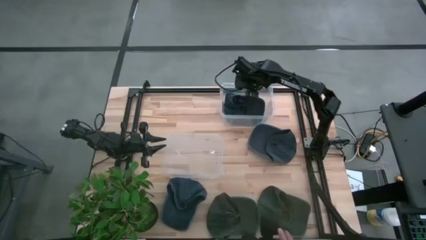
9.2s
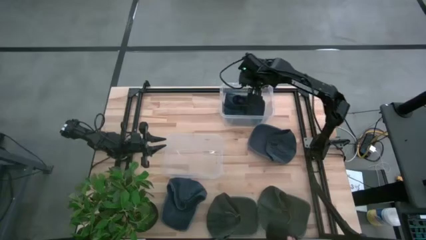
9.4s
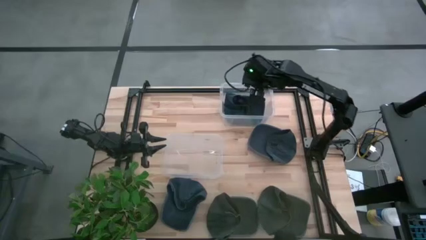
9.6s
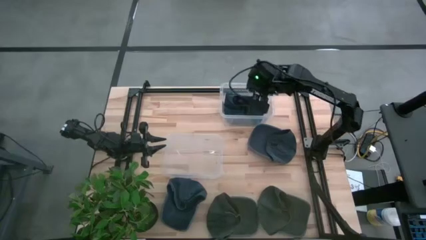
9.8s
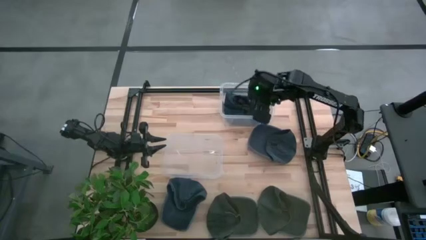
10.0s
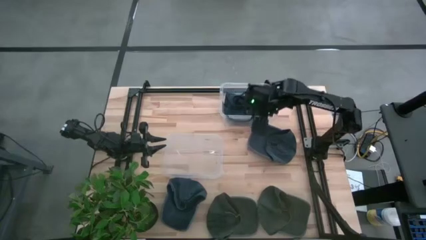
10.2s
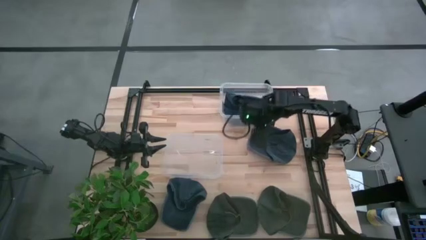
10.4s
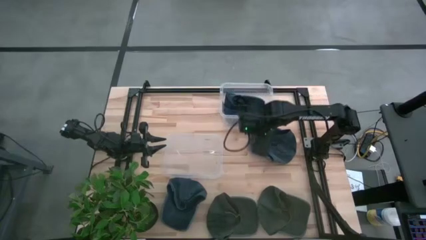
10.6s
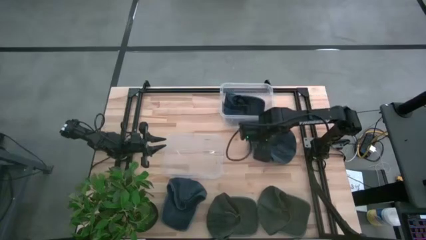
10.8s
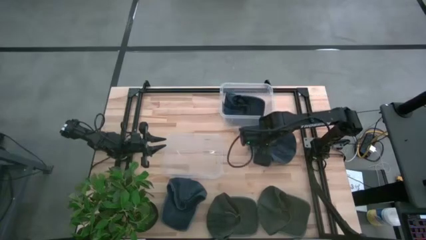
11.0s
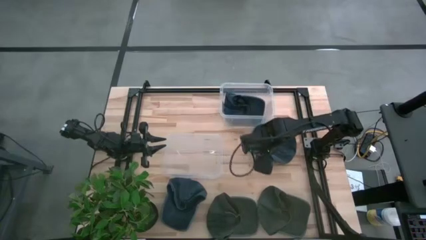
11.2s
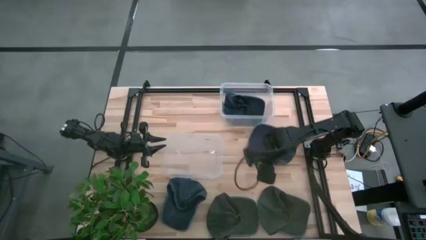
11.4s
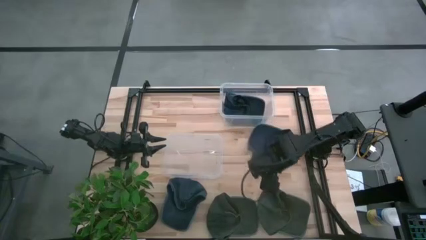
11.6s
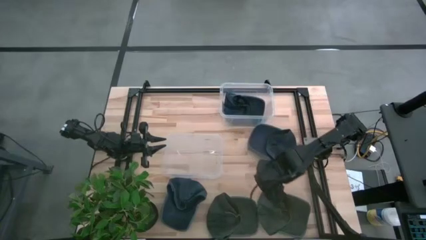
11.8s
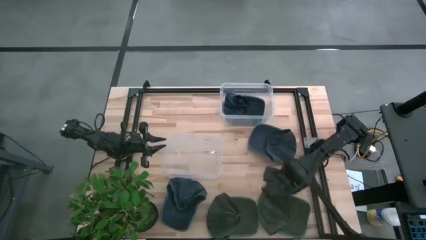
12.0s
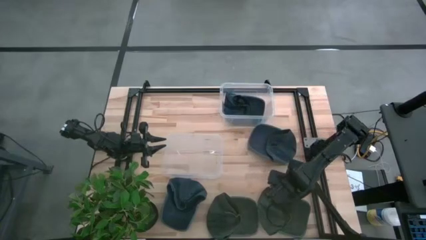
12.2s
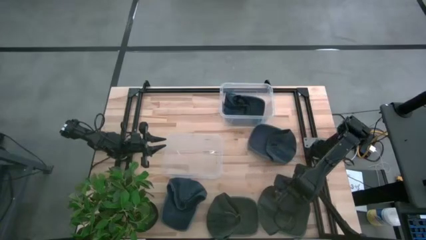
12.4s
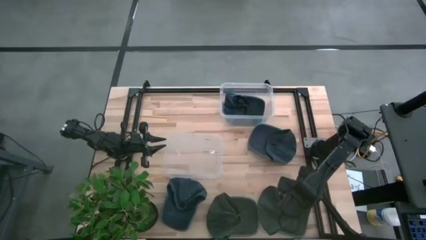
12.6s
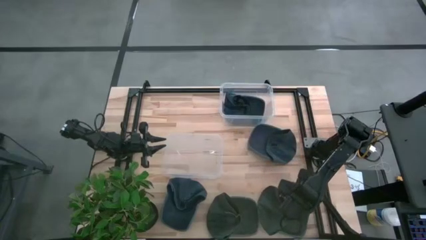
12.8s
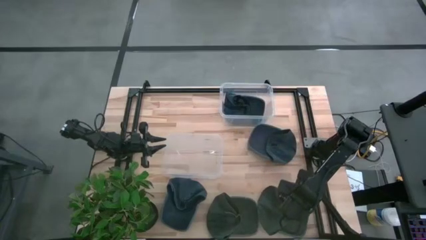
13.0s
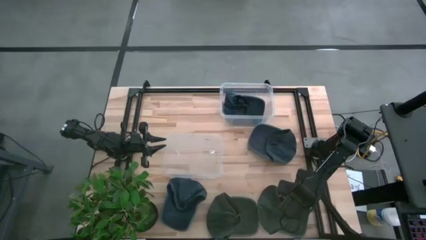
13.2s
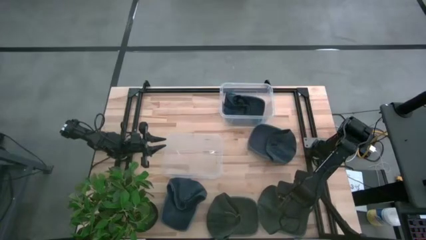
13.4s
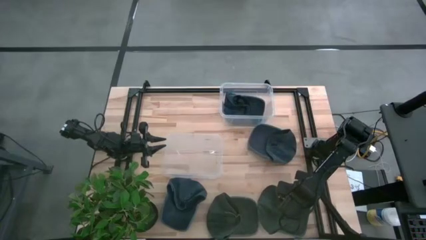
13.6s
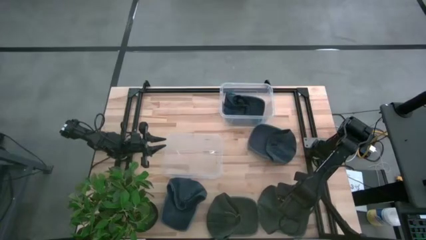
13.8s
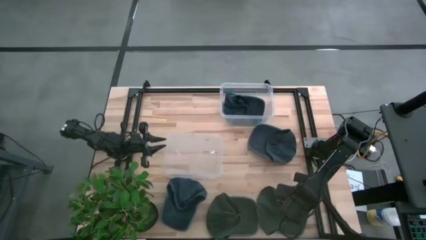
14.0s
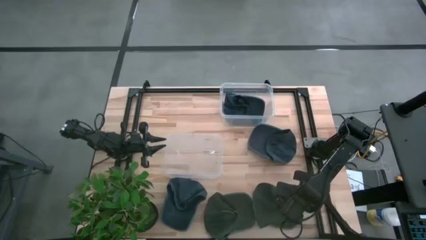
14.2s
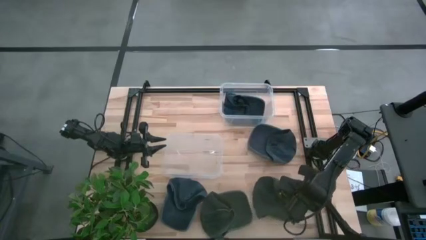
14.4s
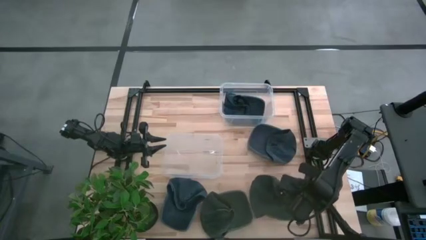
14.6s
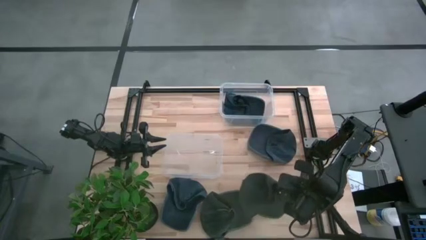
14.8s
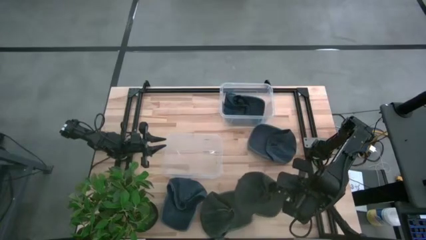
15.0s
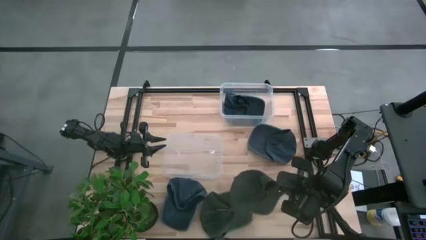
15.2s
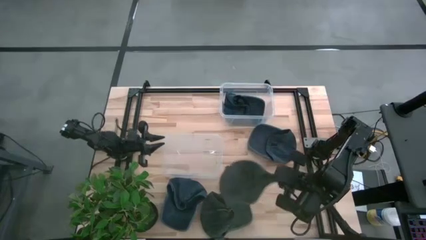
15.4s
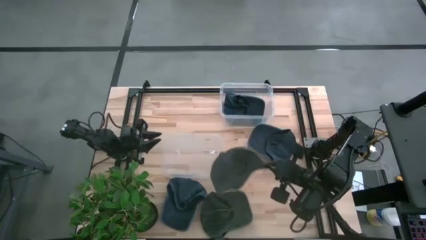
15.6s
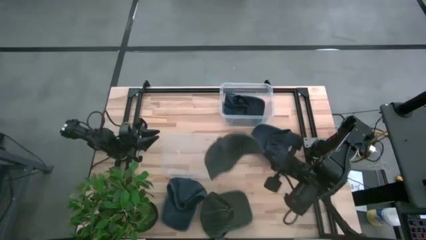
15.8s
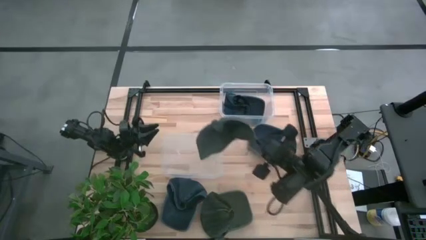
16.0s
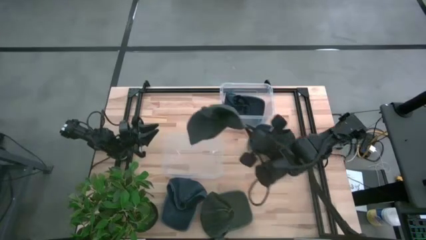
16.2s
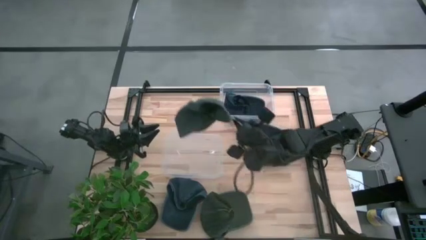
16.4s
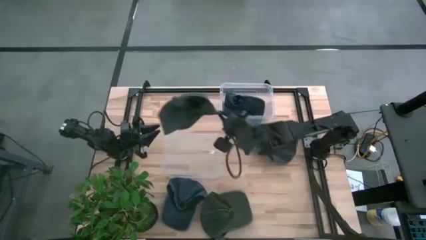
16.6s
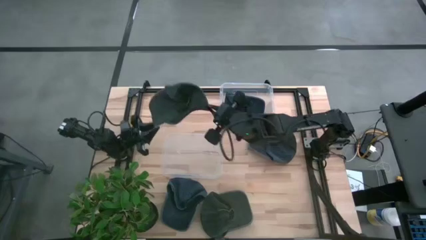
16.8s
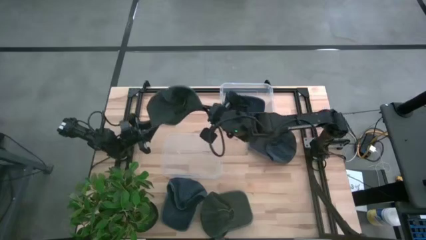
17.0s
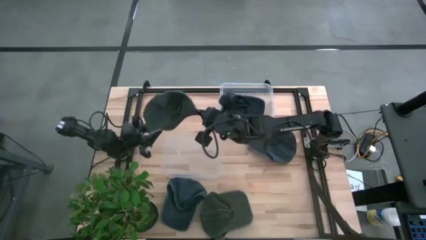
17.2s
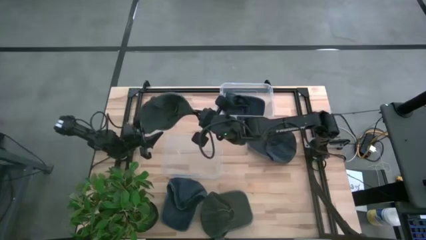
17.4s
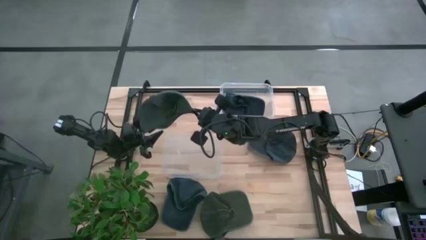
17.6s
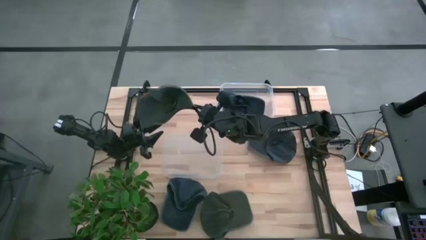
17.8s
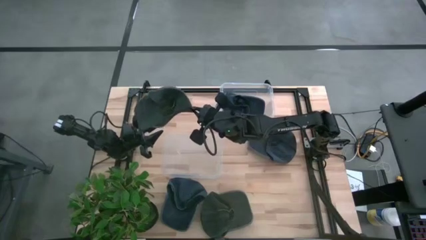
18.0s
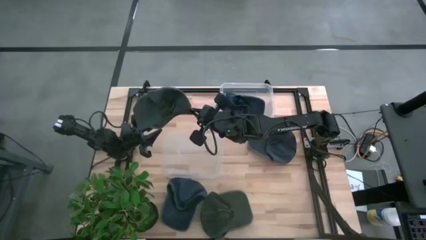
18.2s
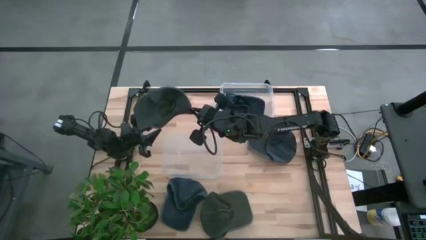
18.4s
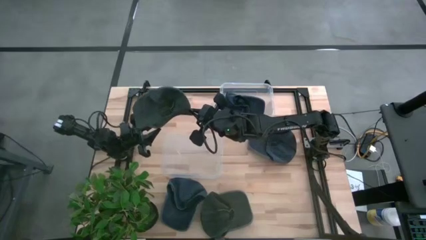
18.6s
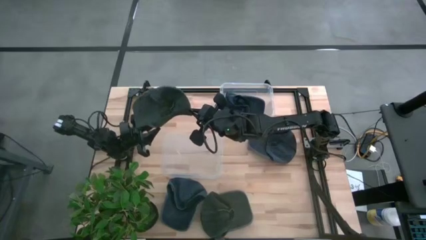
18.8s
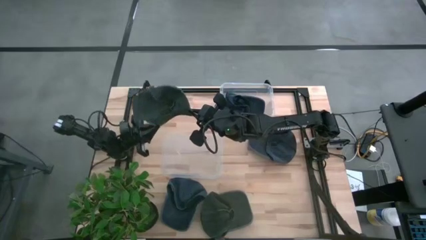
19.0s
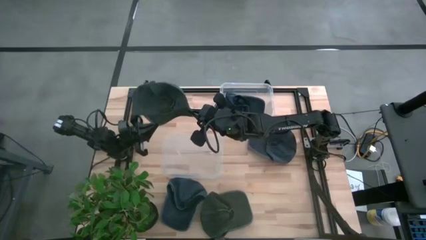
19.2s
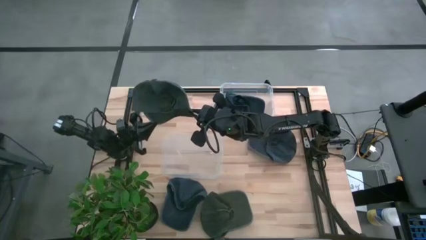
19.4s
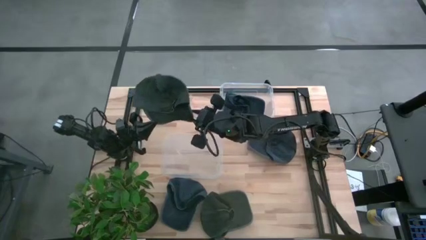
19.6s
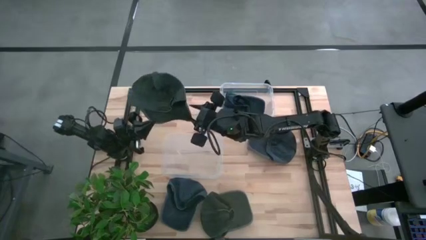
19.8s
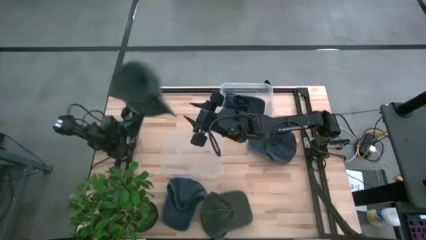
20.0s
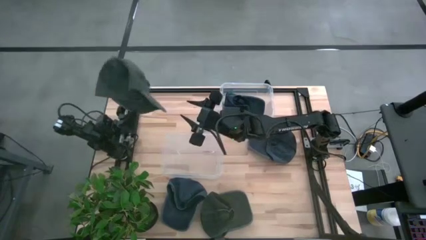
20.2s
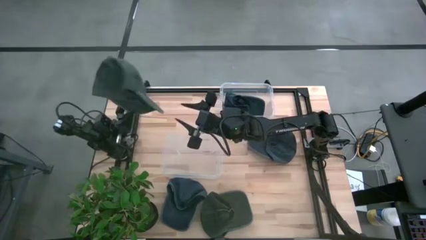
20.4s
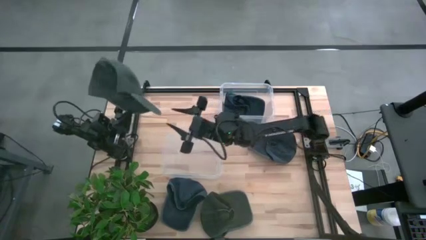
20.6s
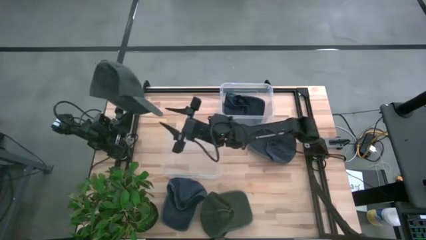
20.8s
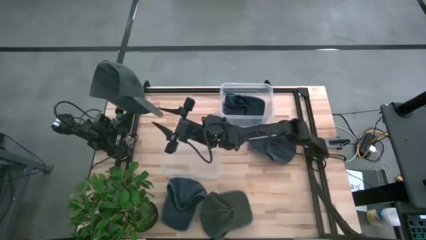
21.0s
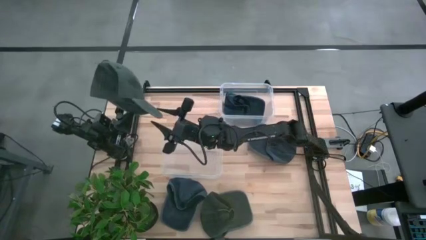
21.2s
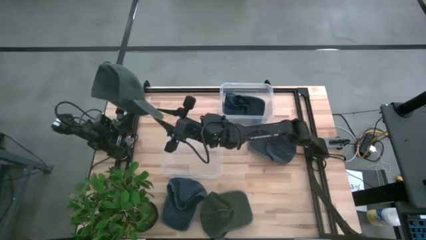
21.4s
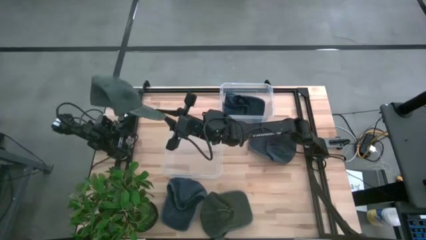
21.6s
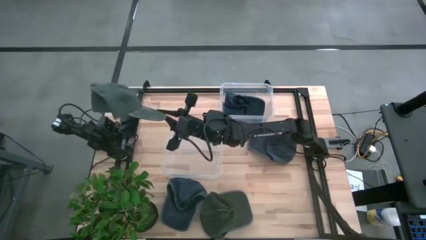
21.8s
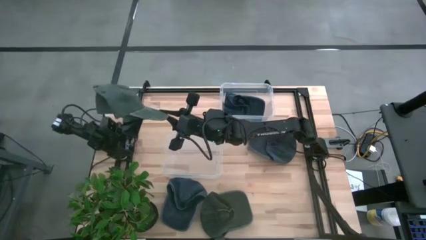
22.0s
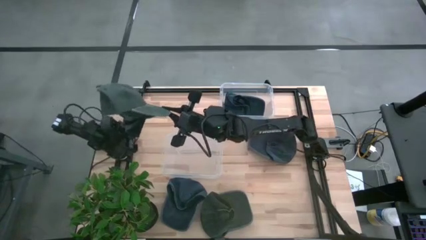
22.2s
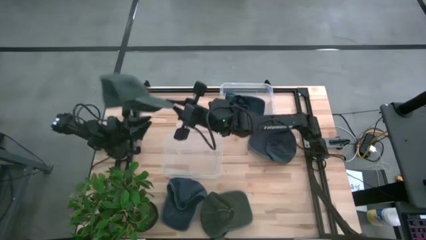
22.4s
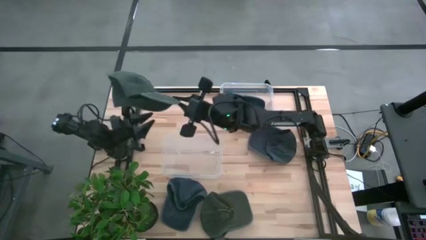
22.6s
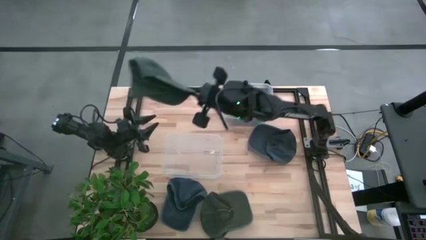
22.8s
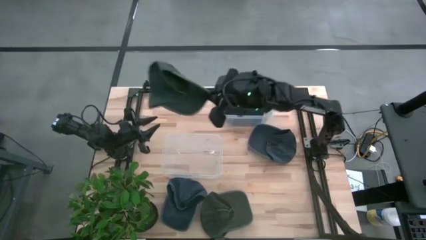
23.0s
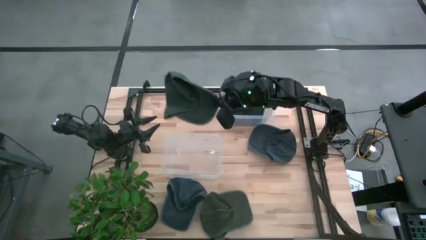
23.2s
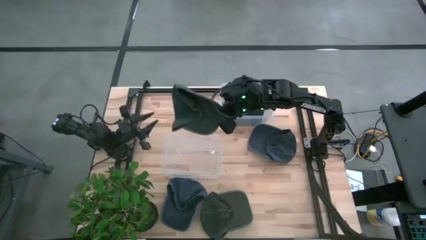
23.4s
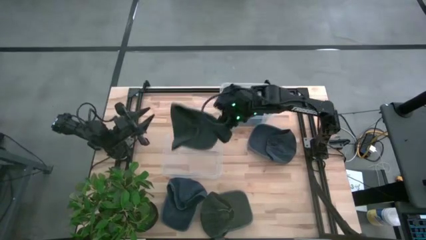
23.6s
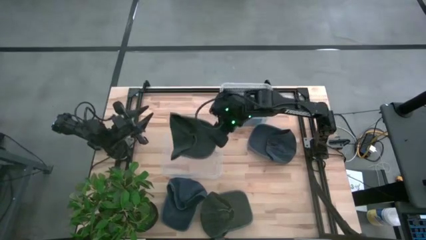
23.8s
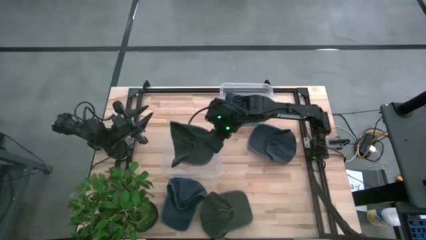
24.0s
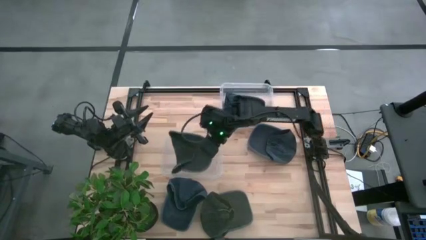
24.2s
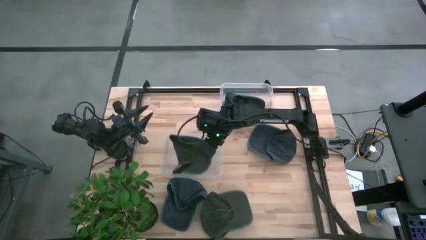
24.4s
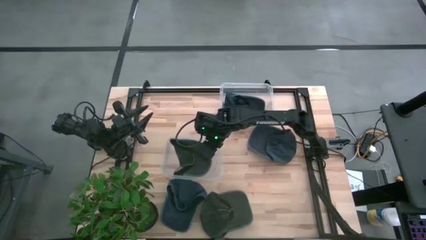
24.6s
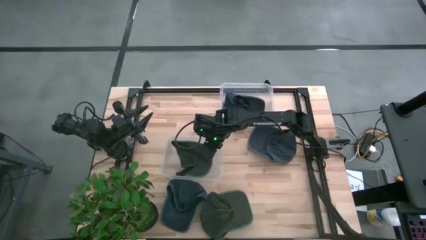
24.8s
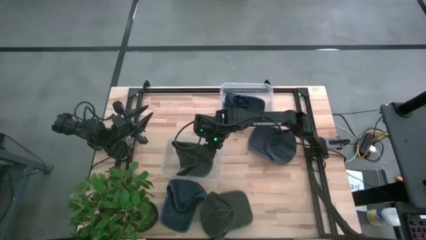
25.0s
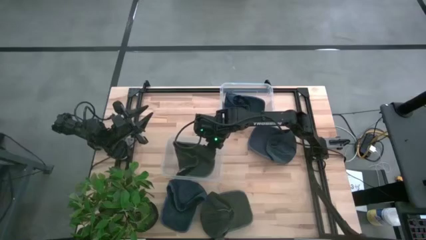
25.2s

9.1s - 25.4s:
Task: Pick & Place hat
Put the right gray cap into the bottom transparent bin
